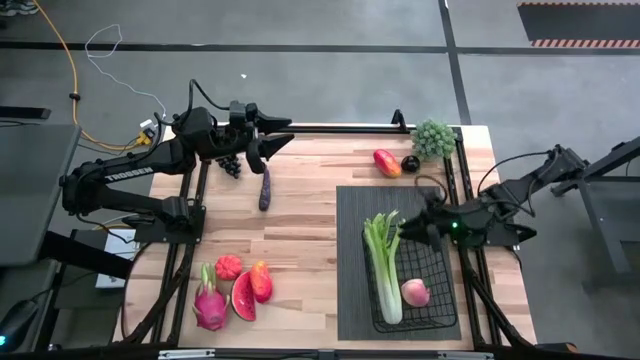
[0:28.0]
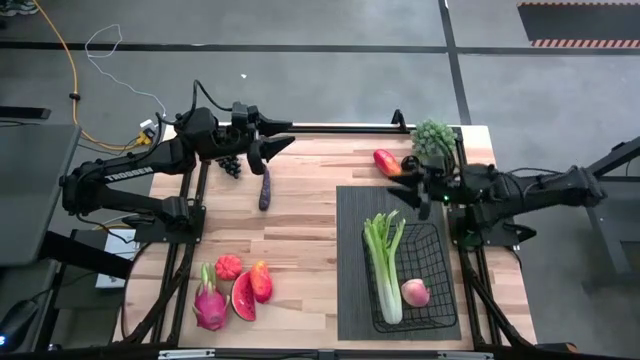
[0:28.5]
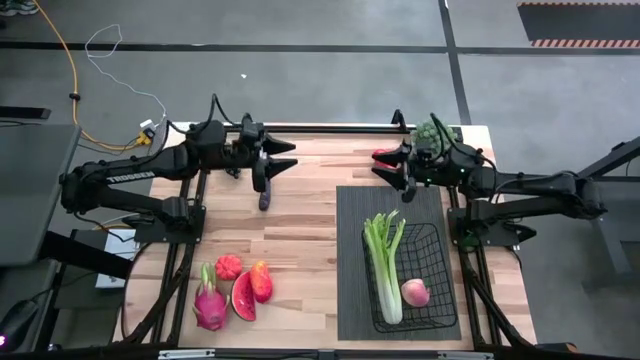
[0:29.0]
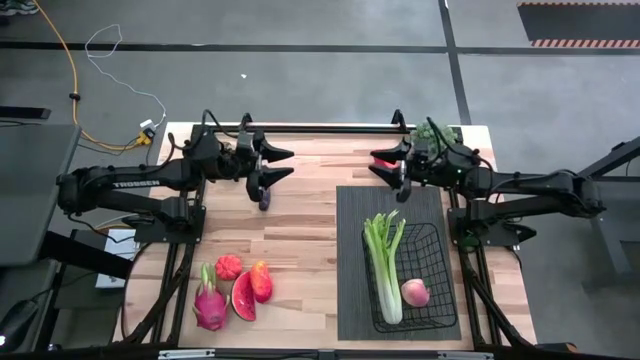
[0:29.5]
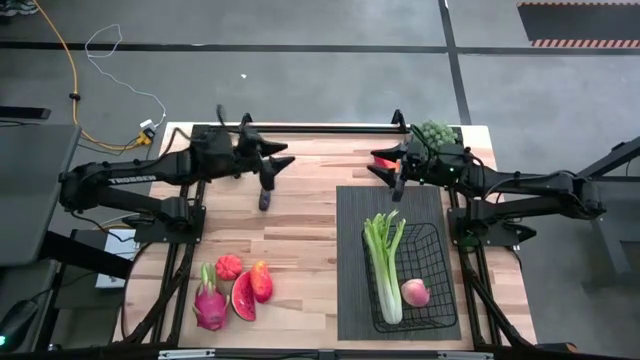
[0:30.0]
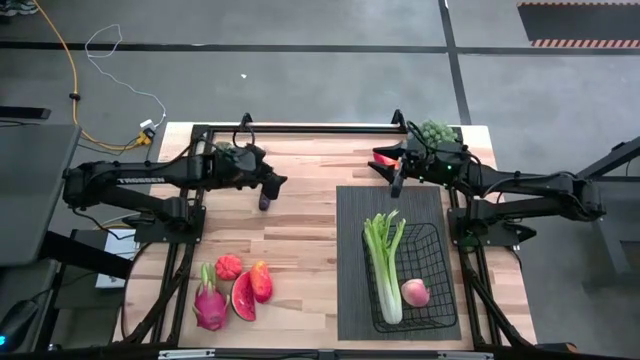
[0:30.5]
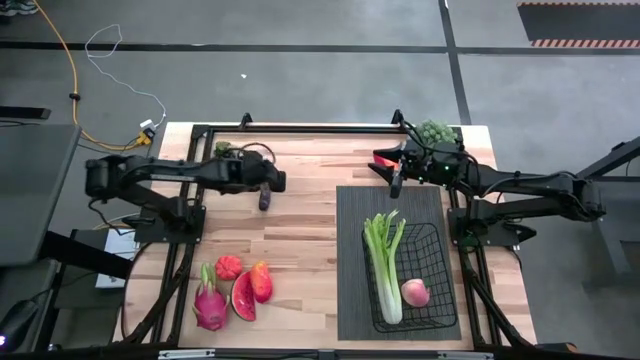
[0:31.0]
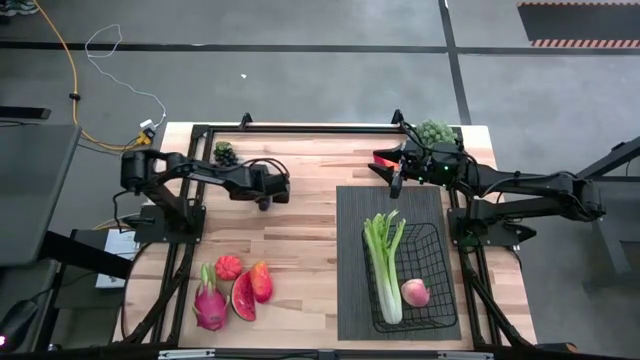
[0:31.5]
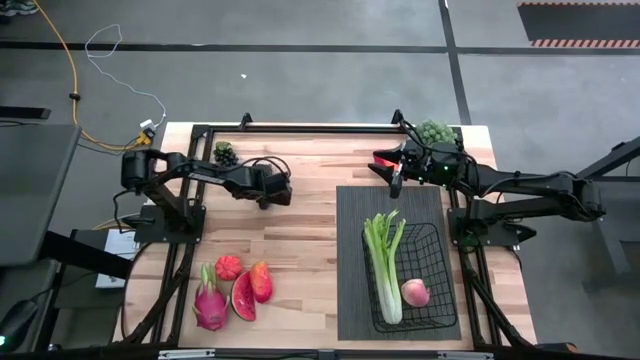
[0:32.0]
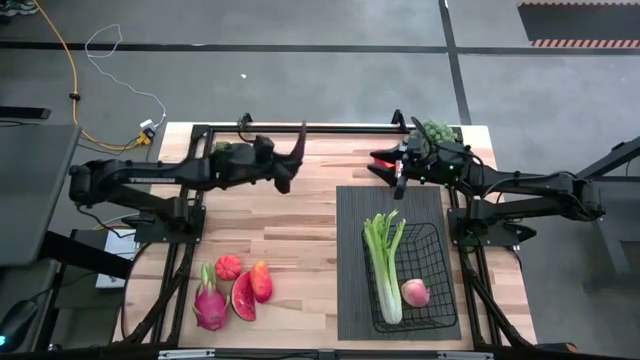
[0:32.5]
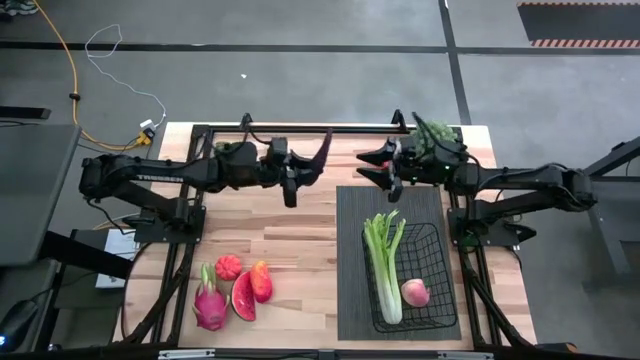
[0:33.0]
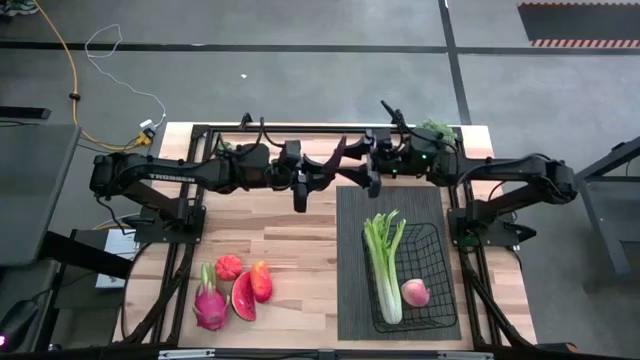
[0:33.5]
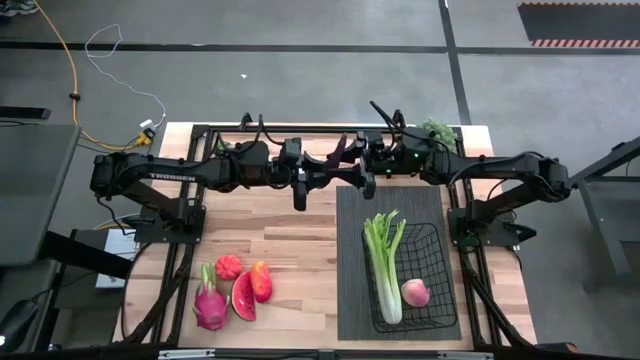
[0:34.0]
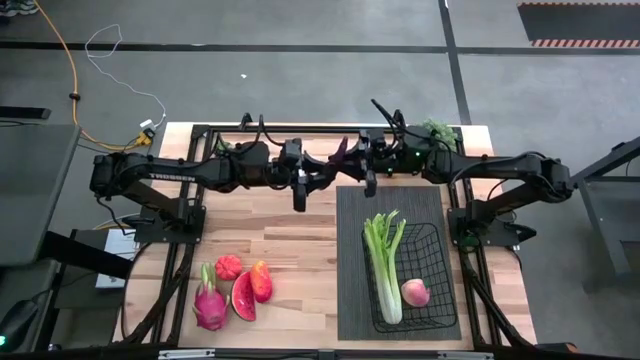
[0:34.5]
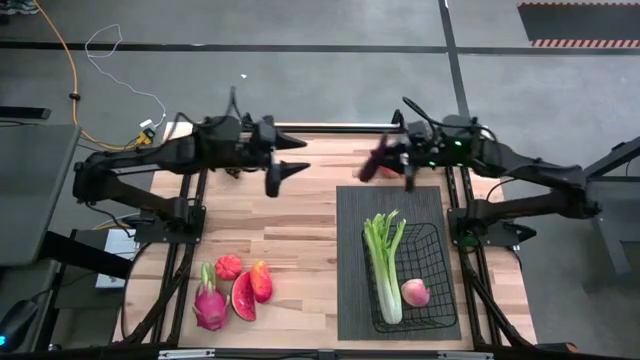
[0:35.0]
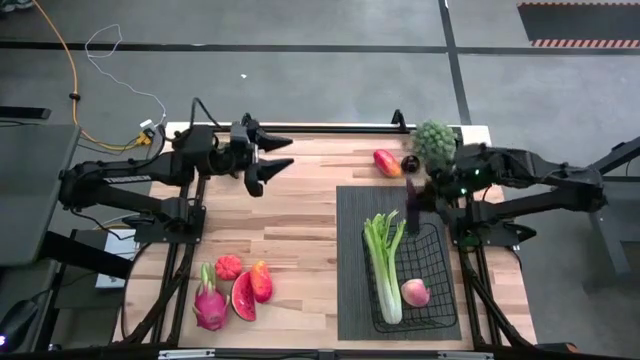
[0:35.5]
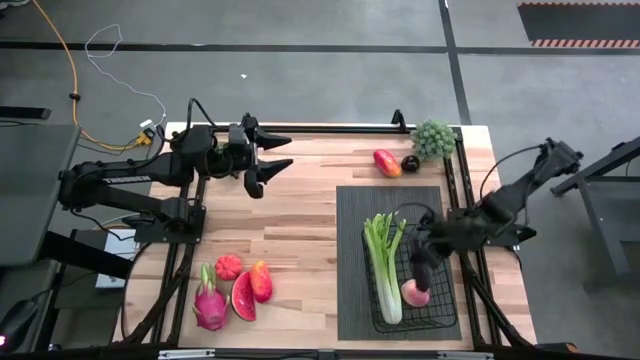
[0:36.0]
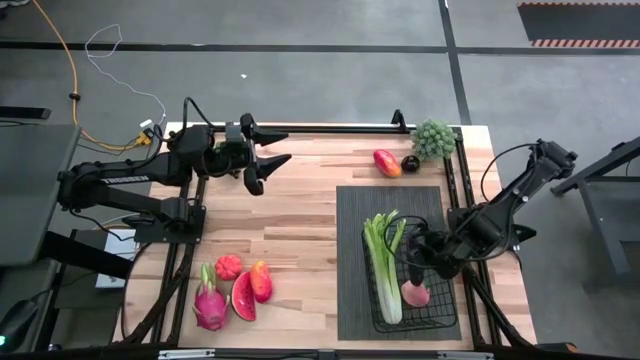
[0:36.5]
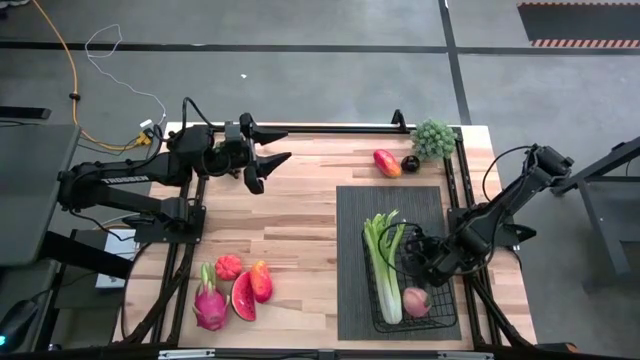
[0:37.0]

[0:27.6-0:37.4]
Task: Build produce basket
Put the eggplant into the black wire basket

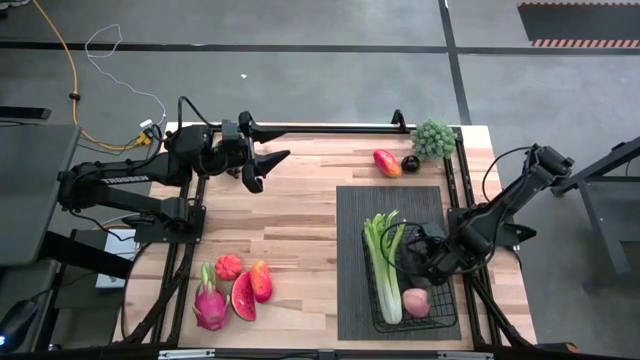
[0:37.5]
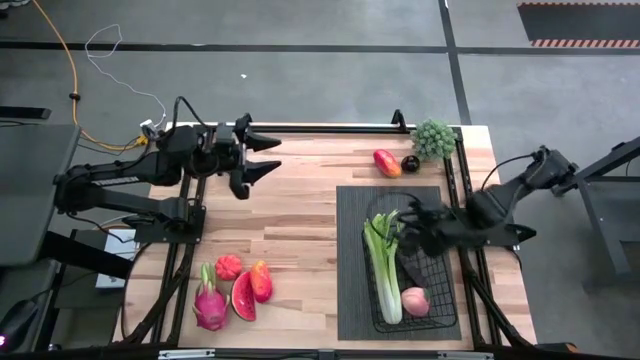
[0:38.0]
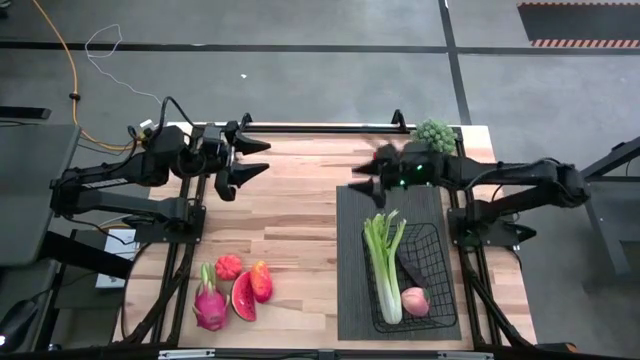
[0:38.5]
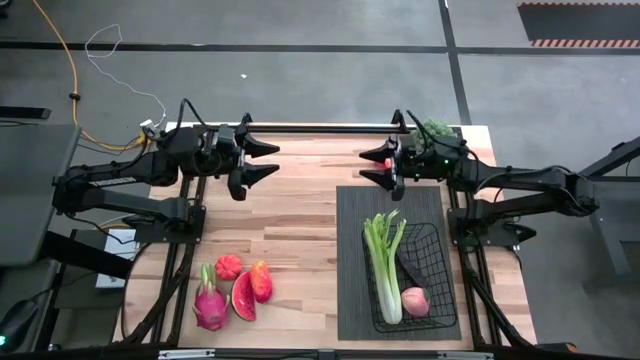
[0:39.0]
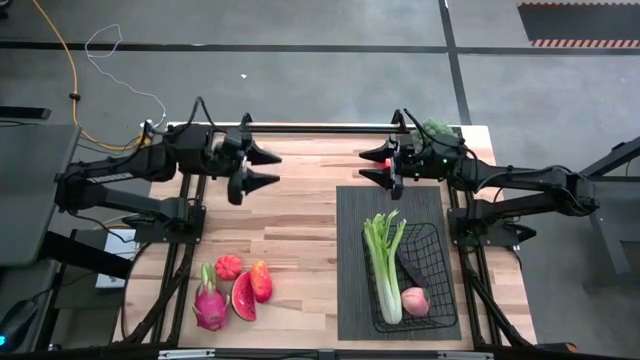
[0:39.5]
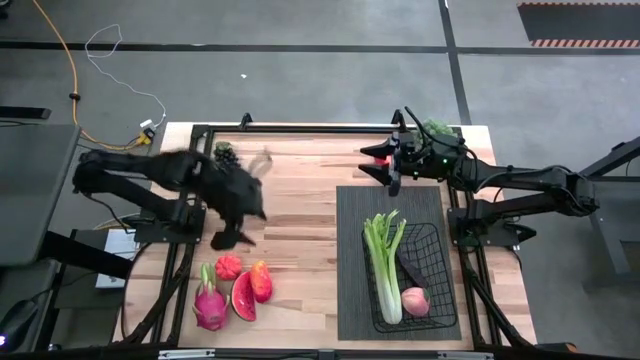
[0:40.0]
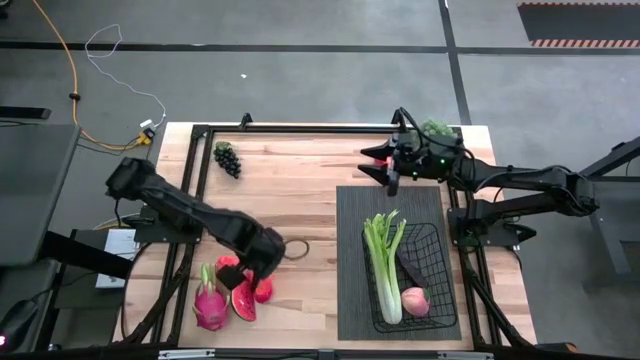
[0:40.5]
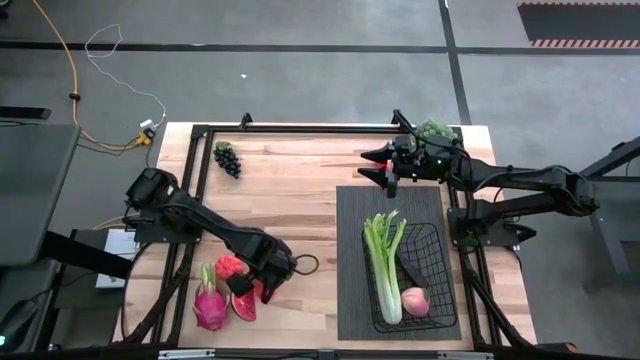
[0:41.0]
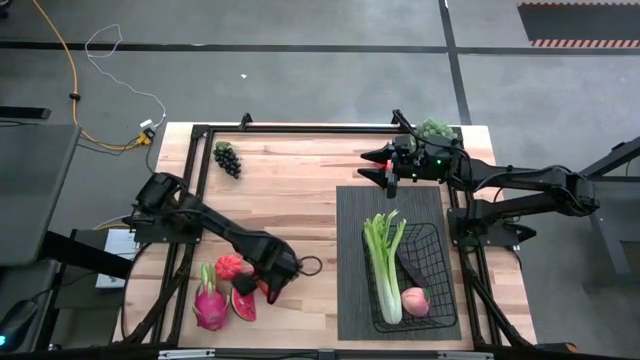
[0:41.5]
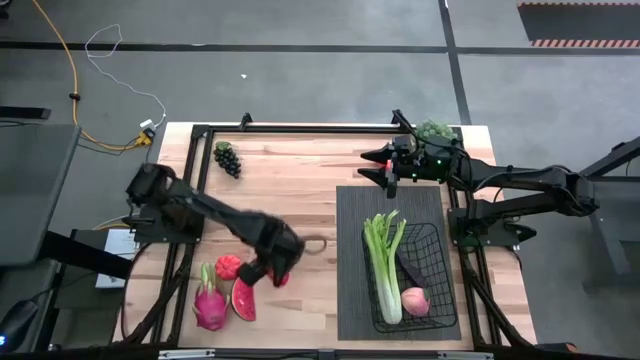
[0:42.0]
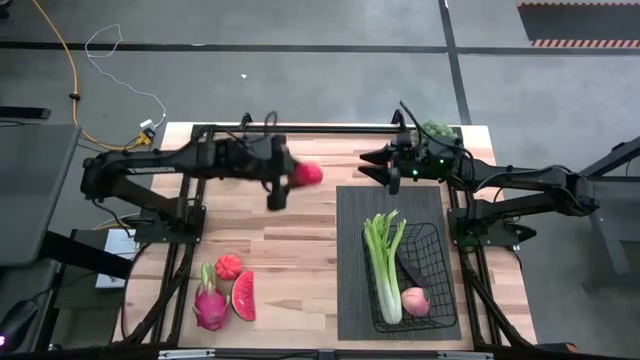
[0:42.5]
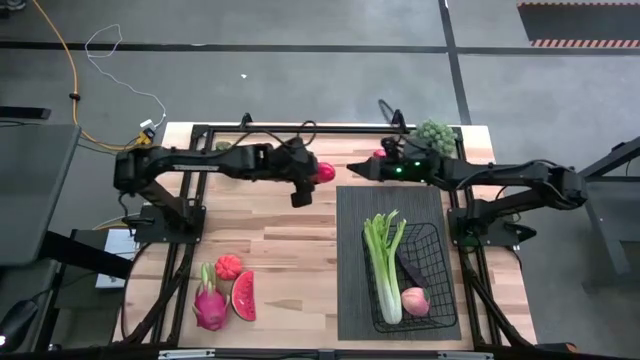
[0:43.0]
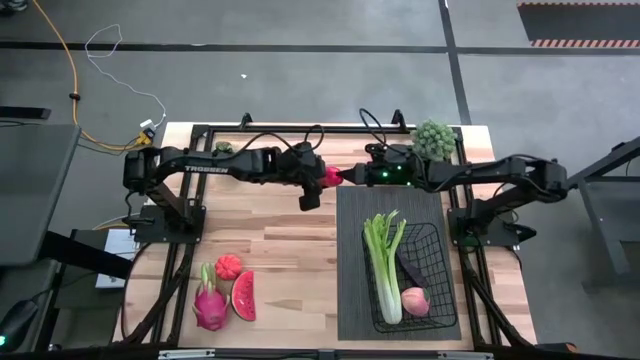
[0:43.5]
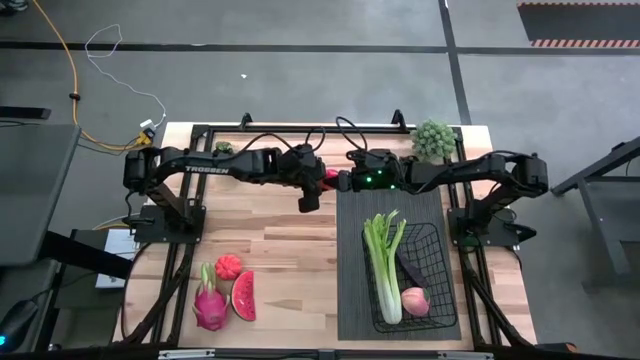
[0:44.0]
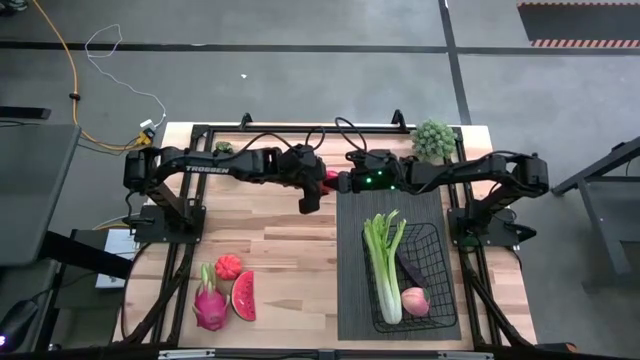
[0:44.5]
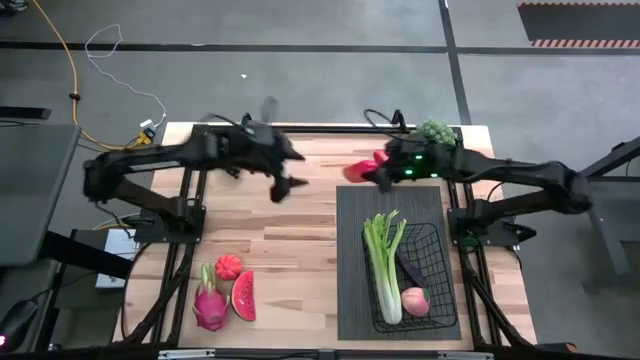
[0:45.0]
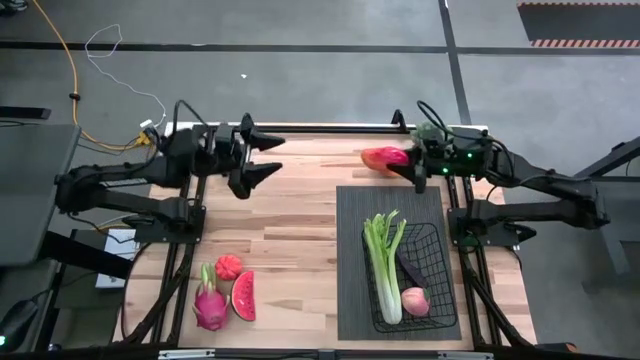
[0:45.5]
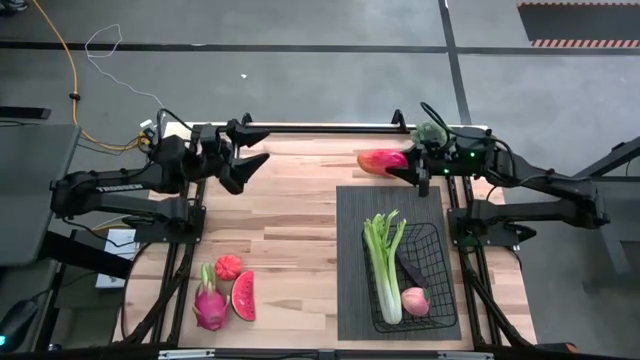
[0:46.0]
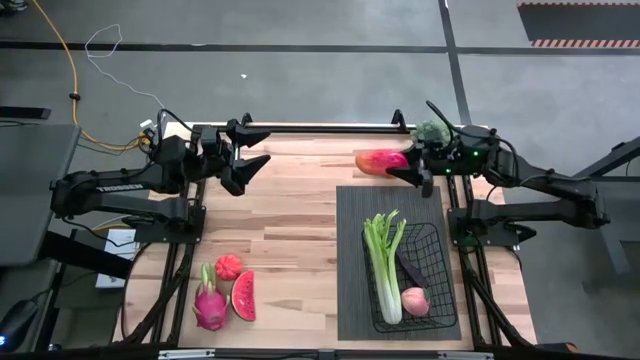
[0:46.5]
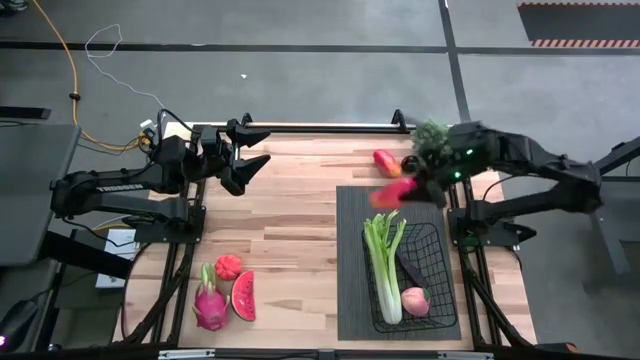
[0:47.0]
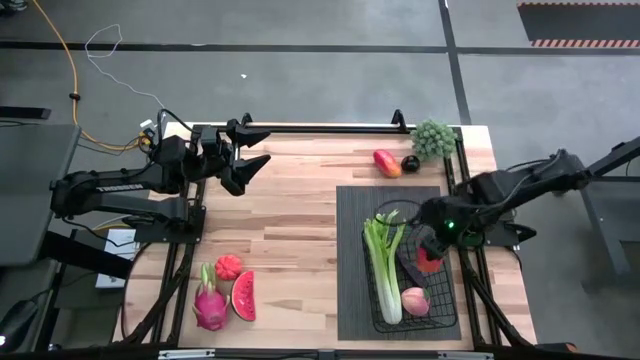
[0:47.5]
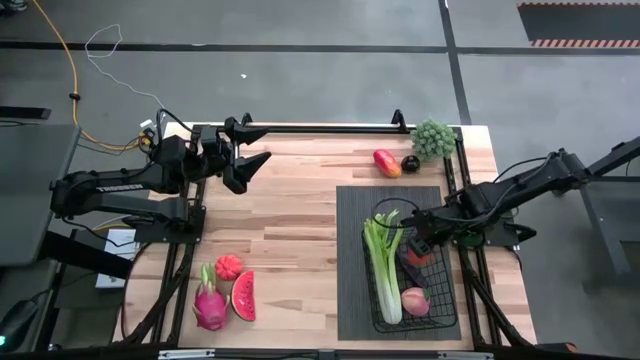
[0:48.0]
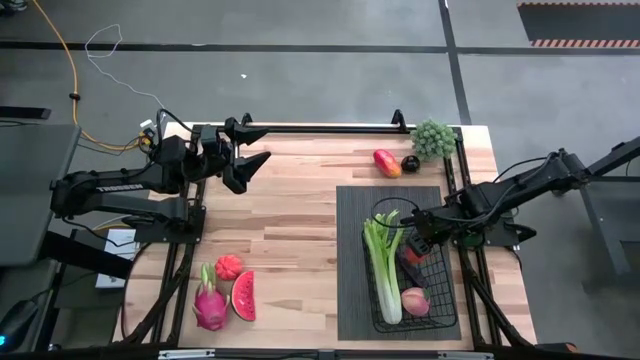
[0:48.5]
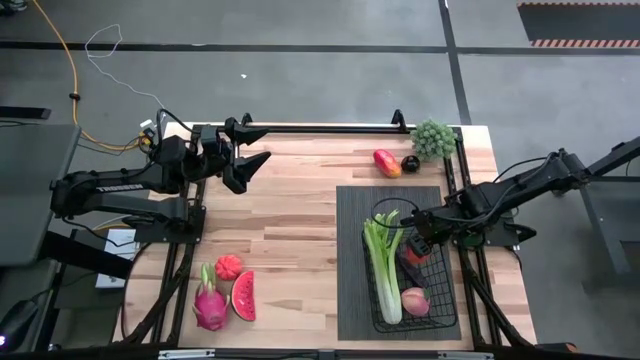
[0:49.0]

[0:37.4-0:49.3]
Put the bottom mango into the black wire basket
